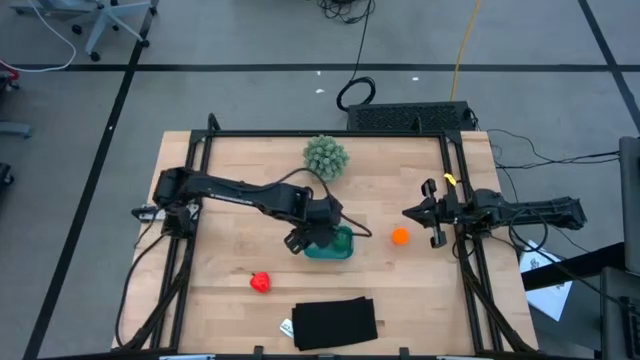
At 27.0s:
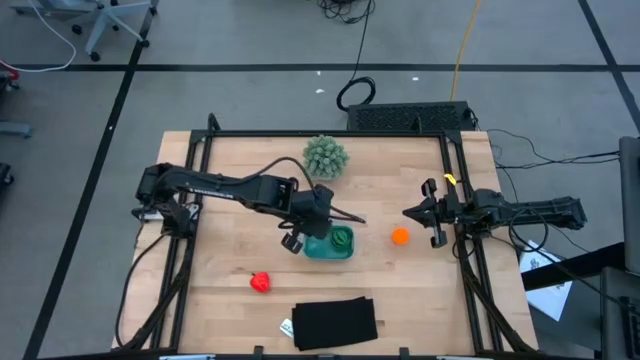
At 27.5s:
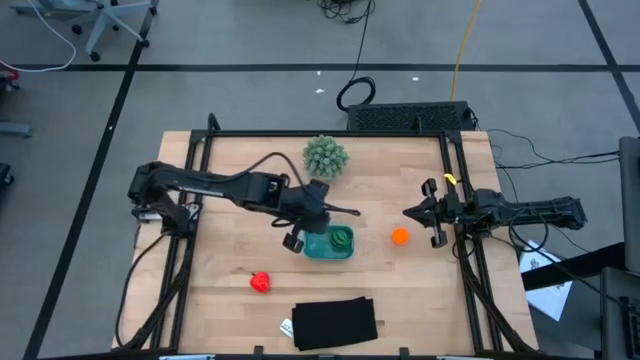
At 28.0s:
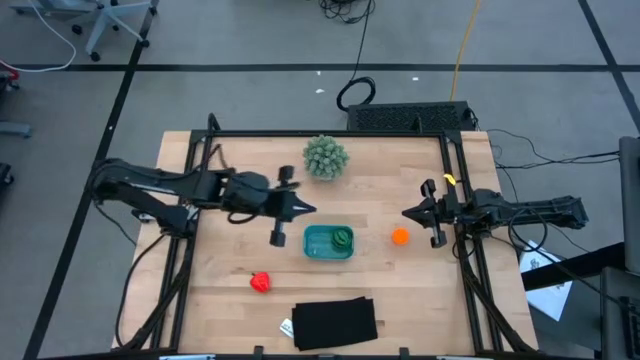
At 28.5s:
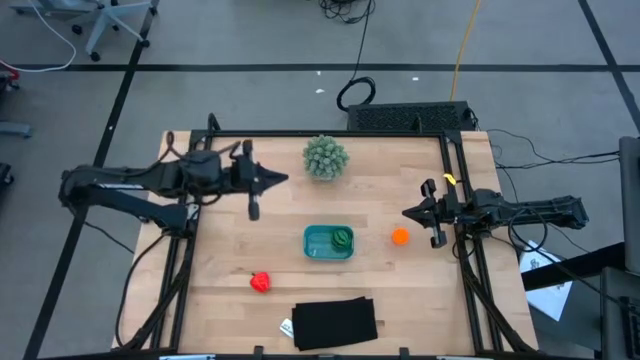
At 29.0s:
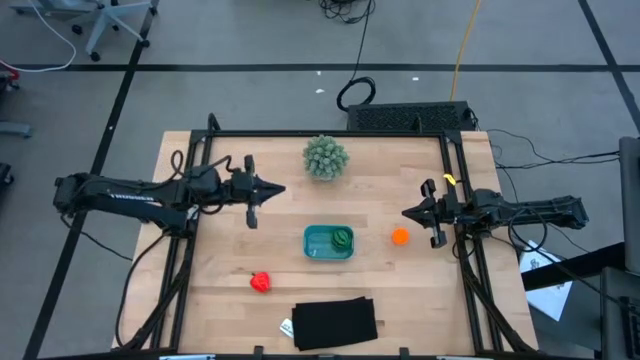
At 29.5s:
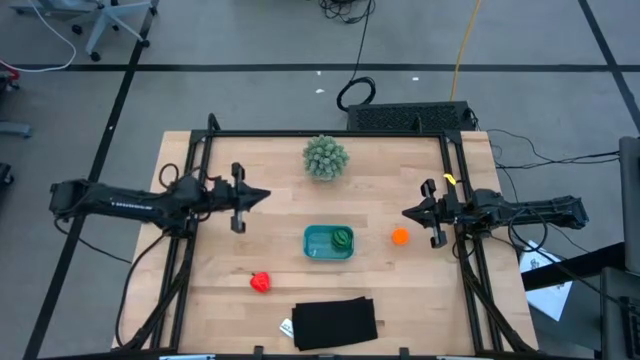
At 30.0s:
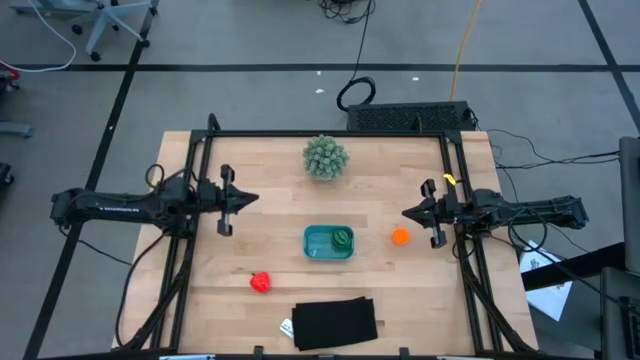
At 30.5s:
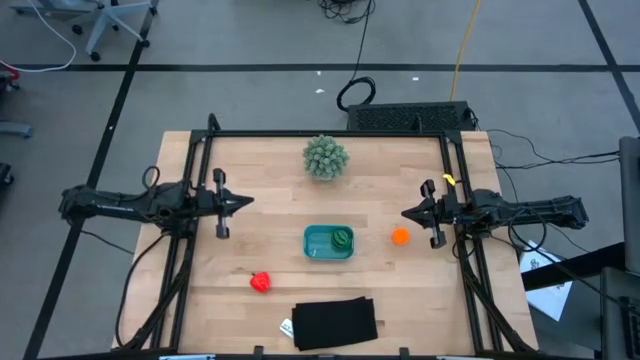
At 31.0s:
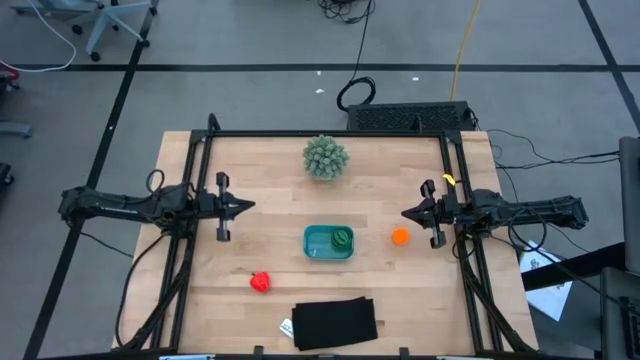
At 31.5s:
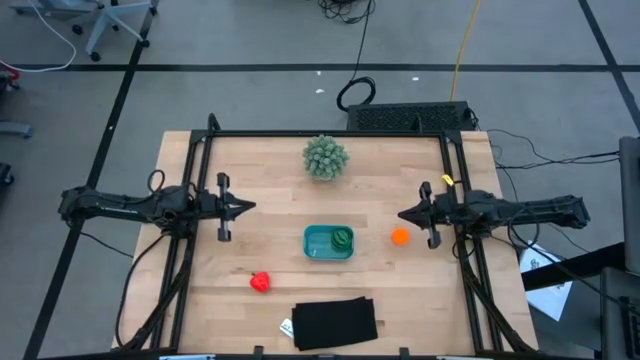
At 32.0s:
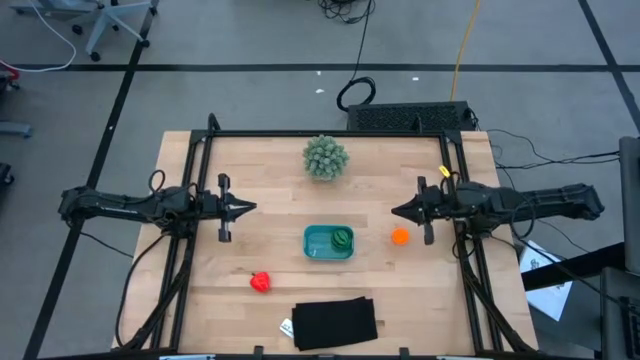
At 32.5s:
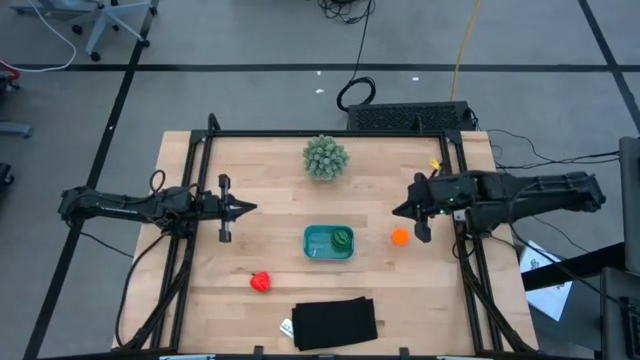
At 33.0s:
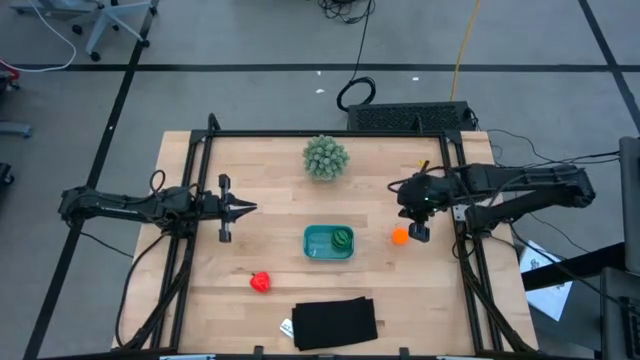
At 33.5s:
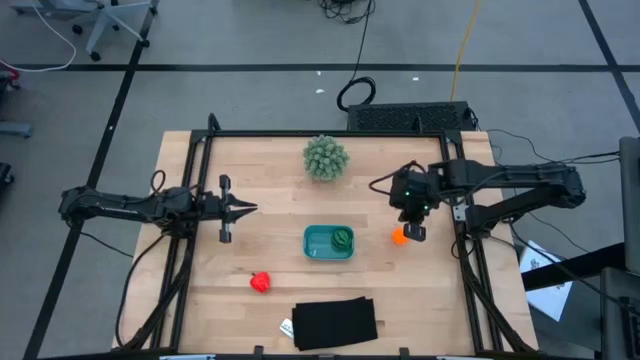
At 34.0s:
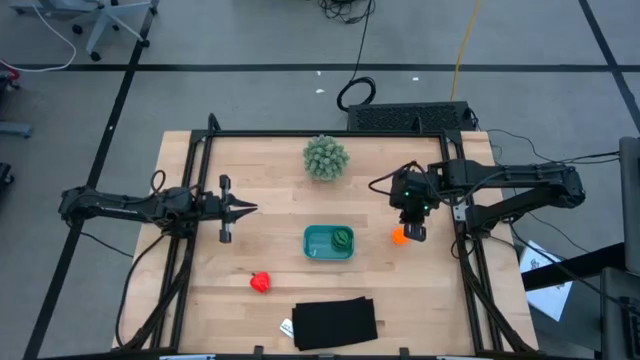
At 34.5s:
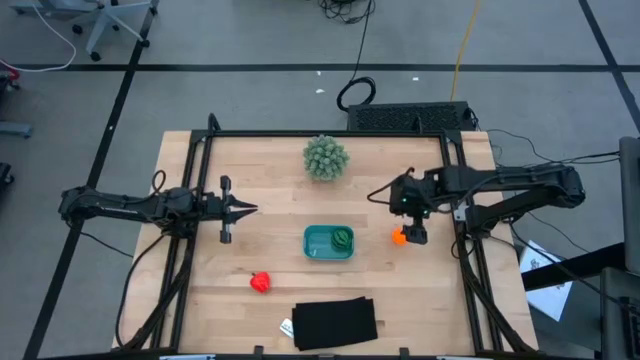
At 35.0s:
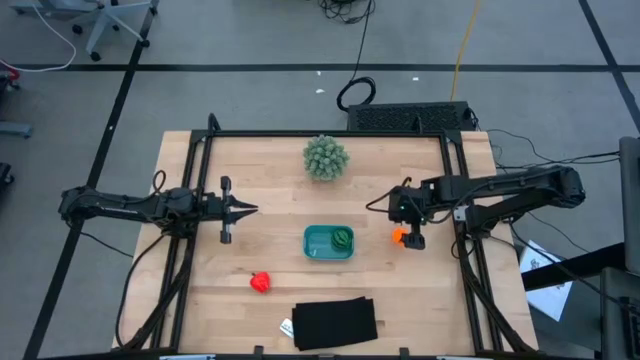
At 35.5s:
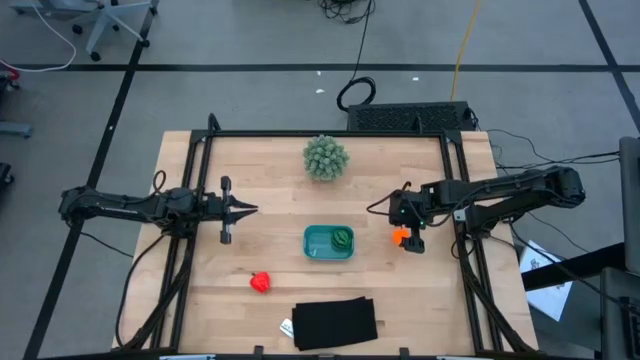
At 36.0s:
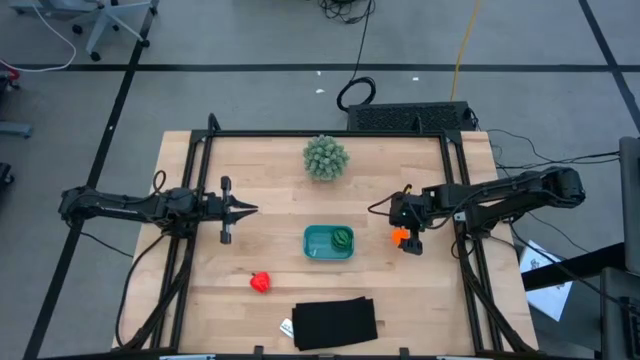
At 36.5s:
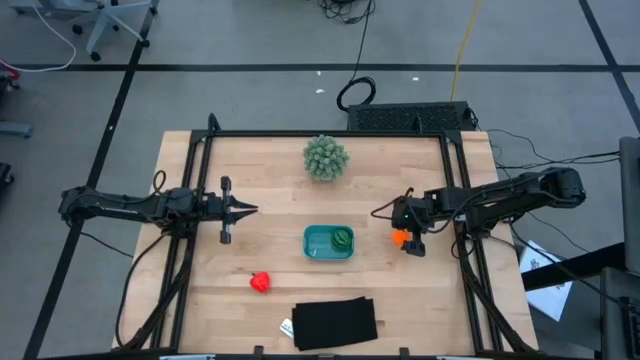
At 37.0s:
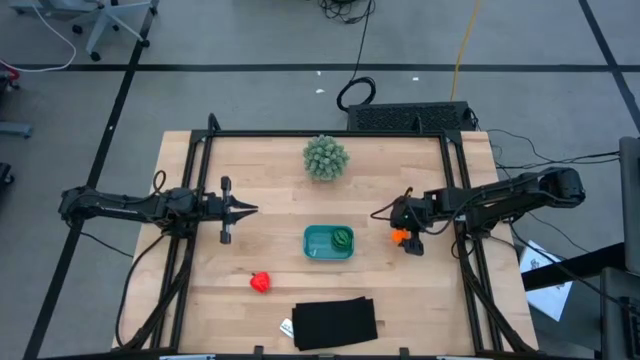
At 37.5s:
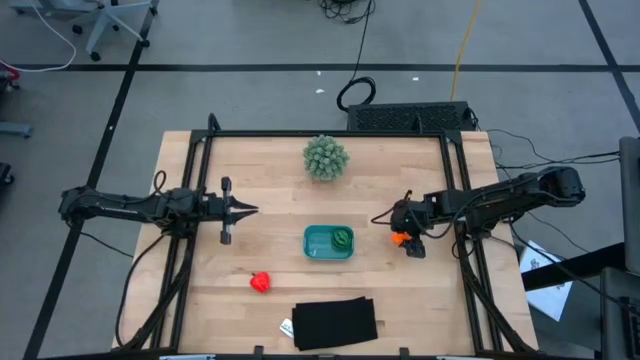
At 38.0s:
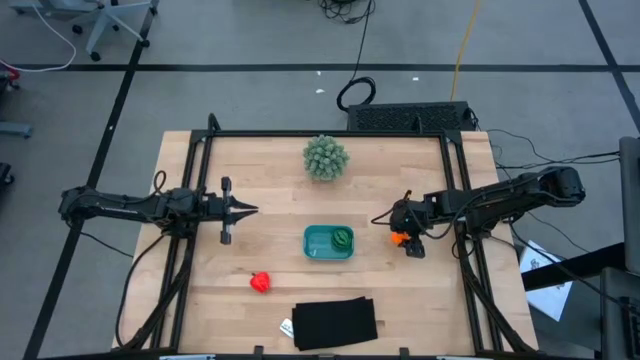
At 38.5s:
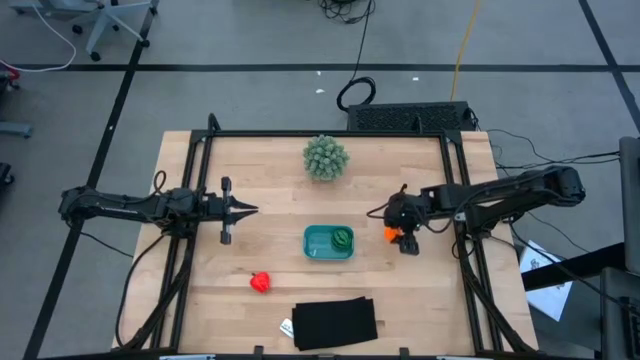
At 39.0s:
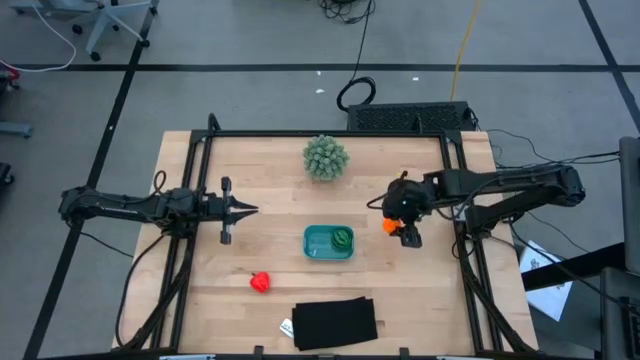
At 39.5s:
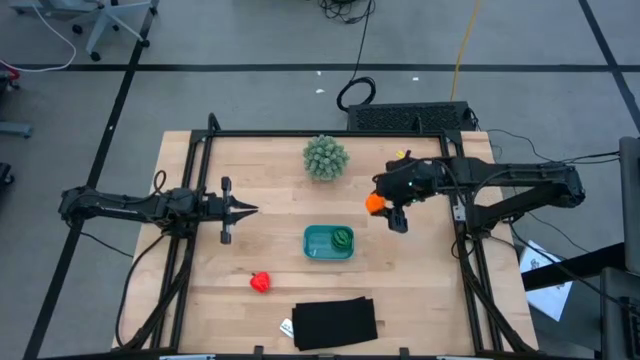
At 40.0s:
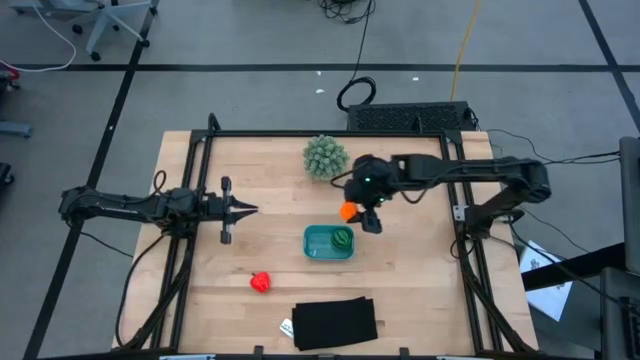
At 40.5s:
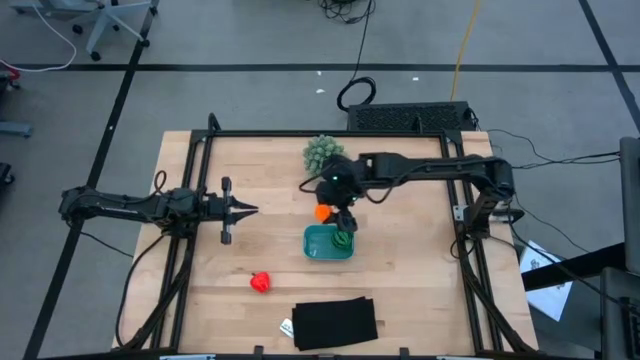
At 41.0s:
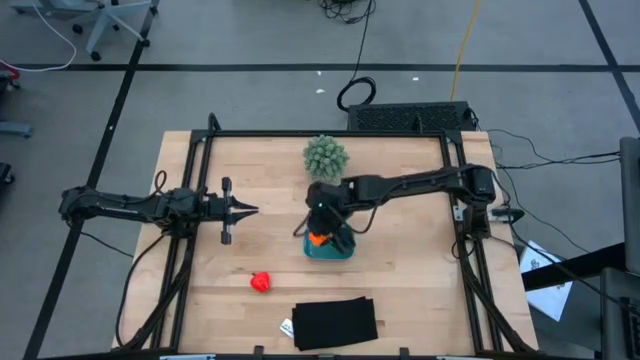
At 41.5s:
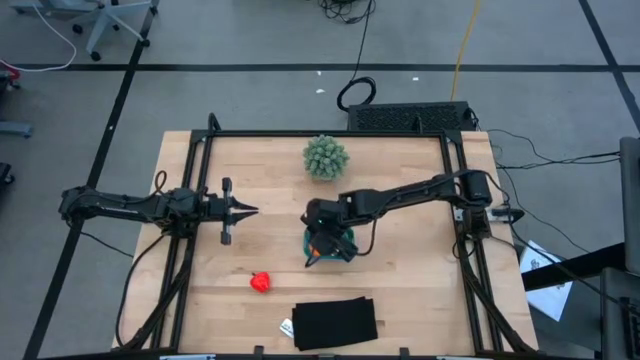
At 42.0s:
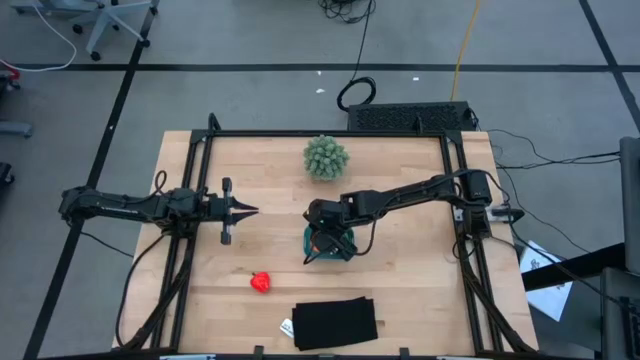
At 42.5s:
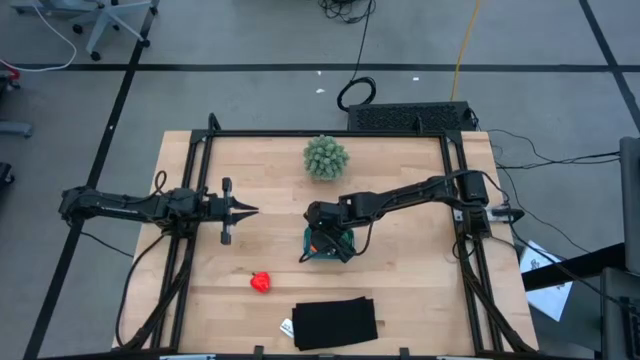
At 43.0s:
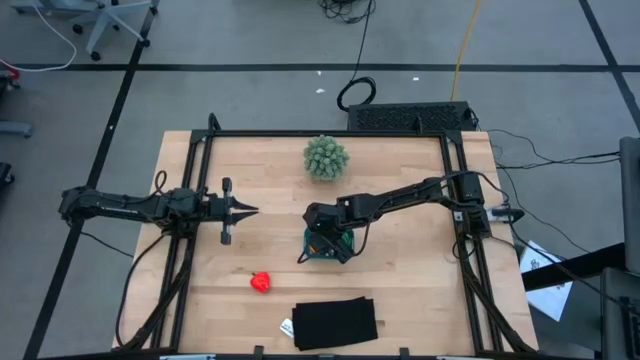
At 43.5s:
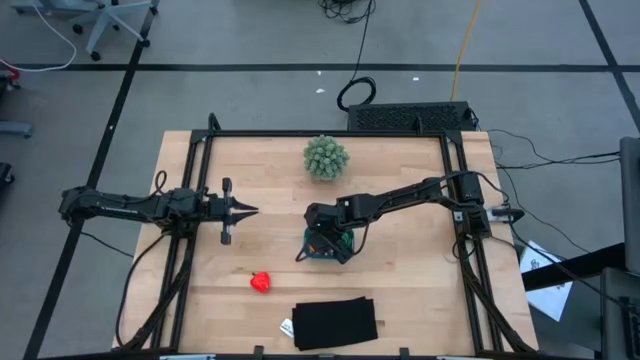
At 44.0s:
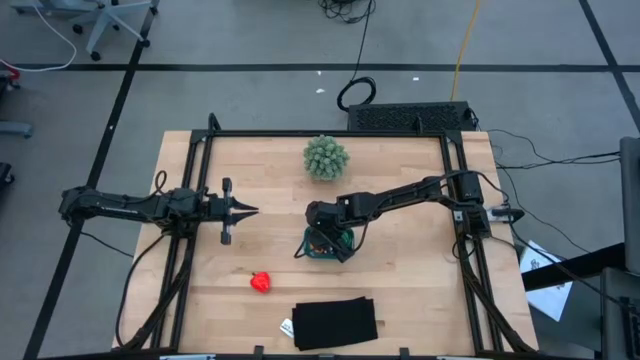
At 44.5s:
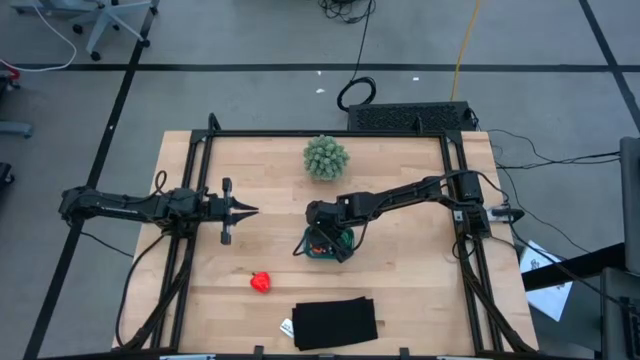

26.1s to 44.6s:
Task: Pick and placing Produce into tupperware
Put the pumpkin toy into the bin
